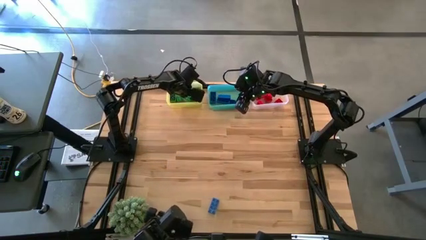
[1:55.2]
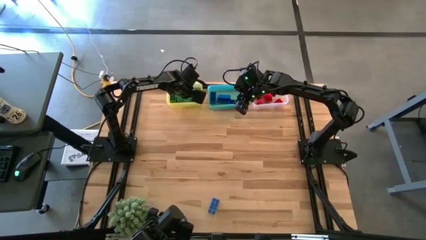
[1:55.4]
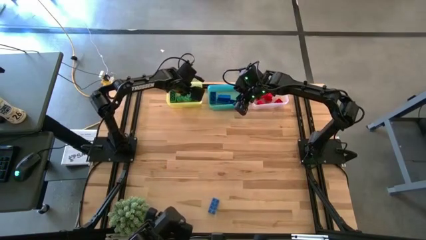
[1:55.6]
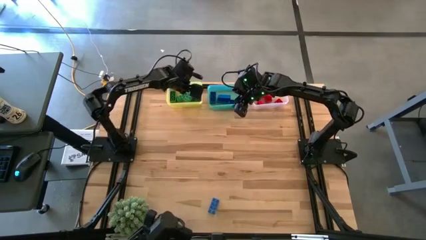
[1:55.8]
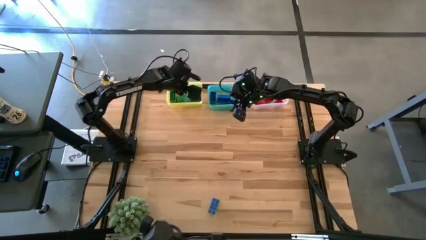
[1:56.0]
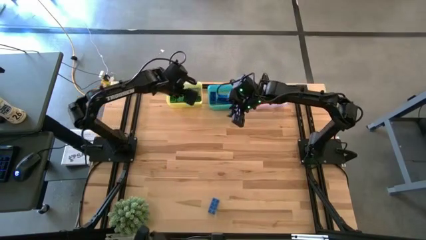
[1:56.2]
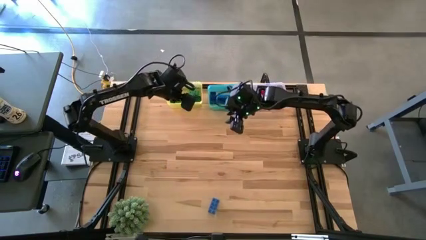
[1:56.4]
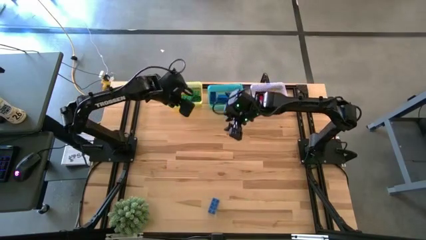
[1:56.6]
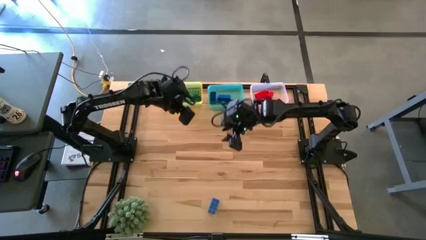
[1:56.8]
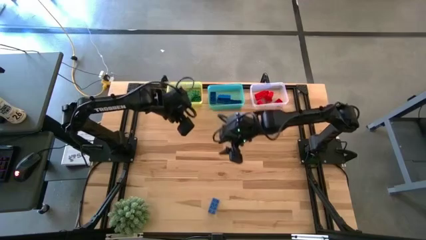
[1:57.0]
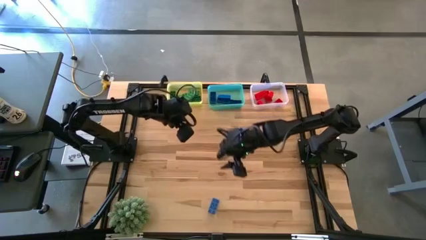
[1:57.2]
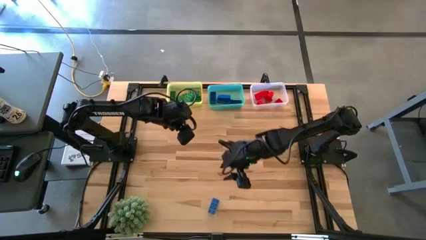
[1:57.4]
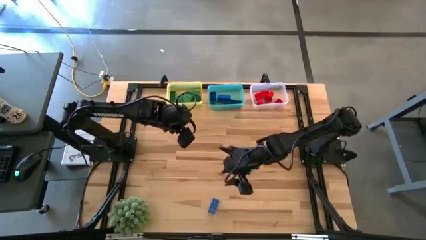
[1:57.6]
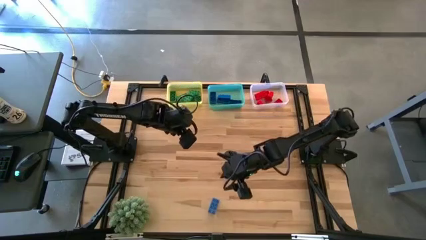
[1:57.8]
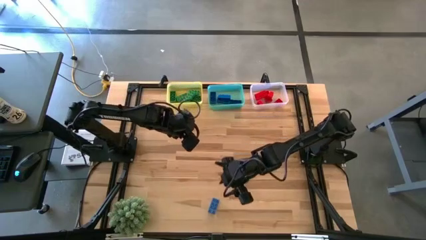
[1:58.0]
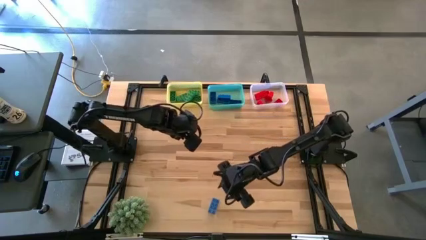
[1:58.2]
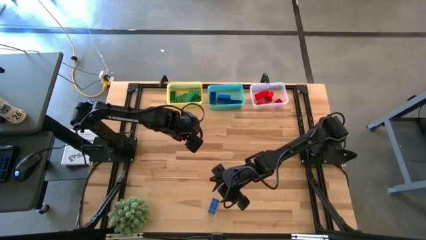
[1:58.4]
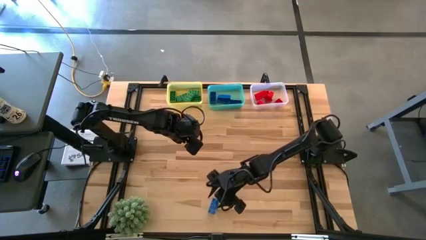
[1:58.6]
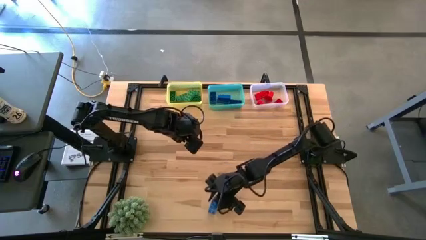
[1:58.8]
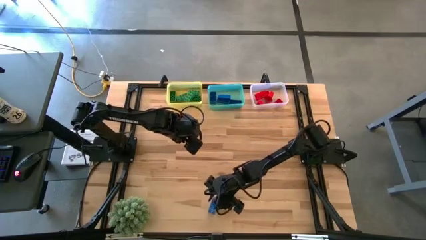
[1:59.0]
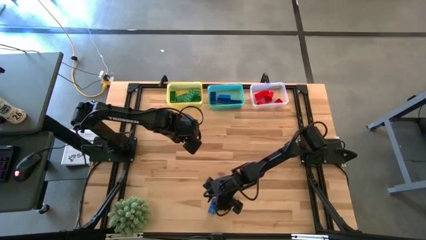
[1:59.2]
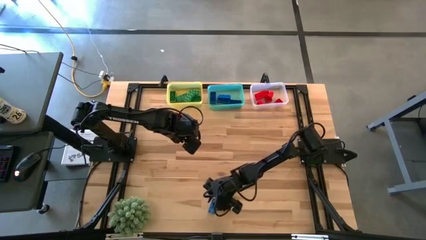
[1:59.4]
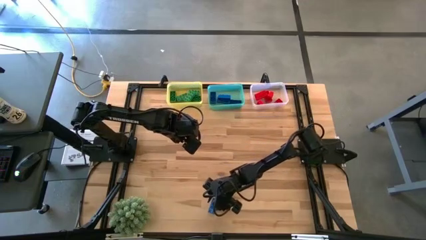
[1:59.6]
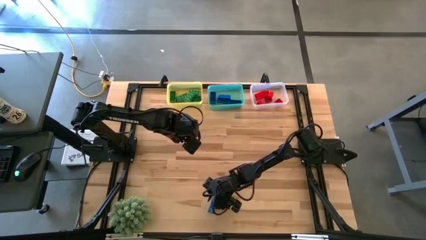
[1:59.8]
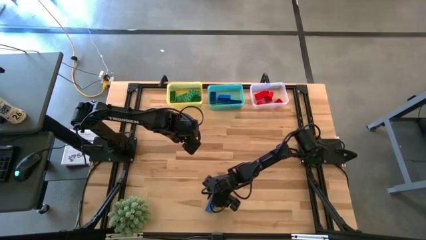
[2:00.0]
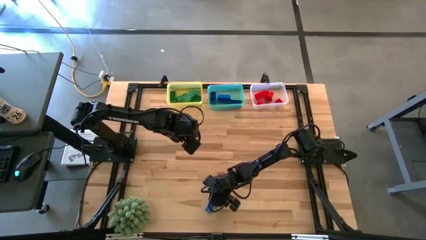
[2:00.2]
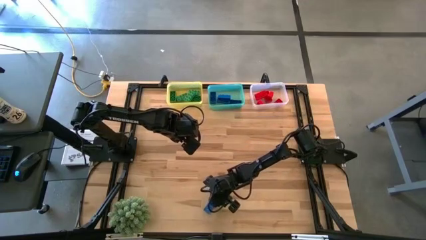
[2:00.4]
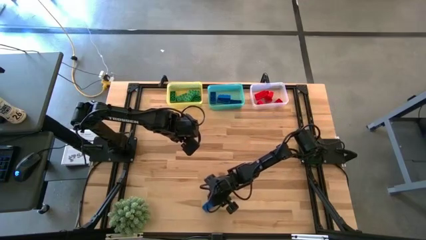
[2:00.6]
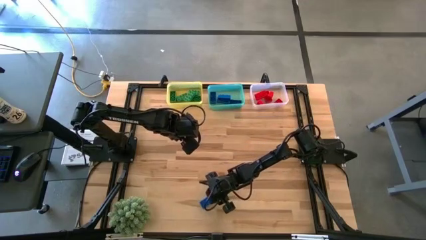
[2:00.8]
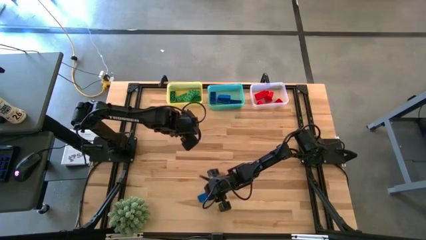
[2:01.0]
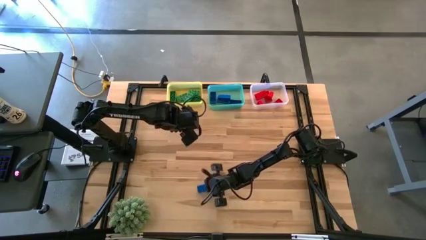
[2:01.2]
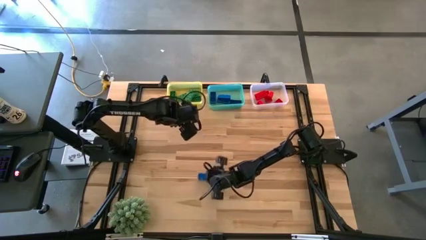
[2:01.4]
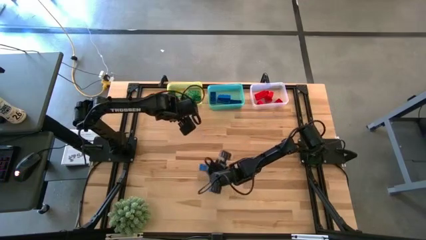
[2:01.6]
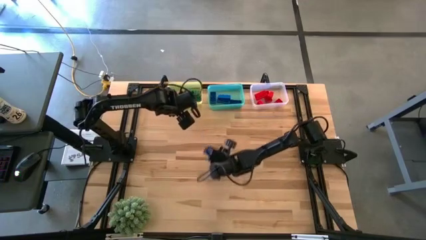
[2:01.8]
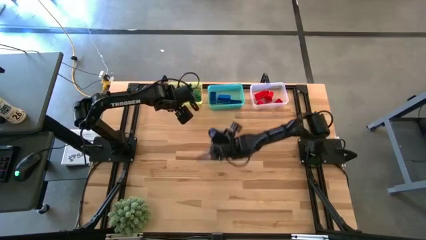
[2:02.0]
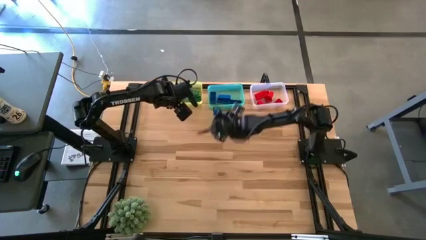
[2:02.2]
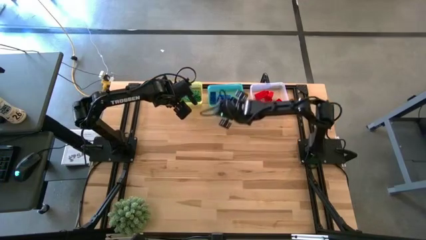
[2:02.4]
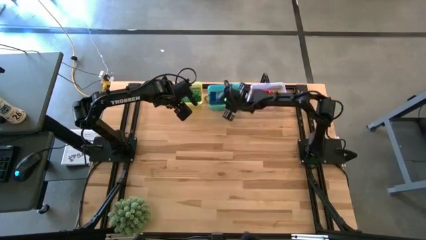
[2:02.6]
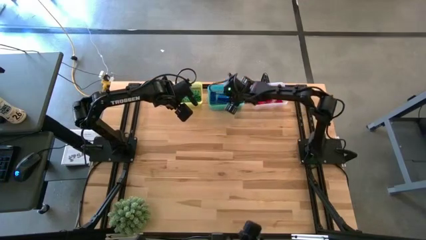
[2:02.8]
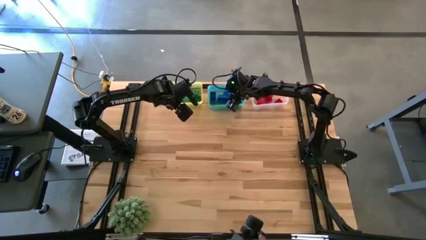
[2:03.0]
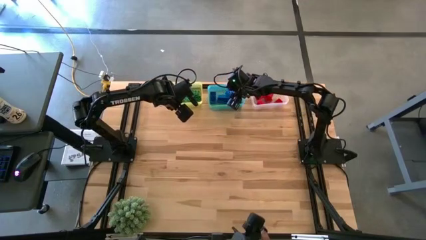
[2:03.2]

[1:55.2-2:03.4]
Task: Sort & place blocks by color
Put the blue game piece into the blue bin

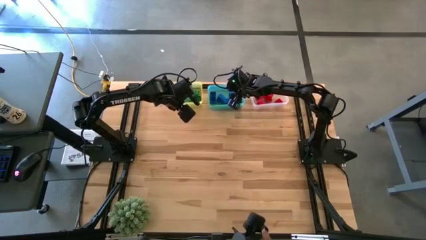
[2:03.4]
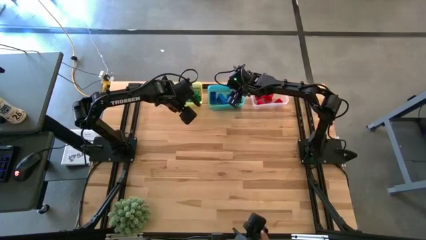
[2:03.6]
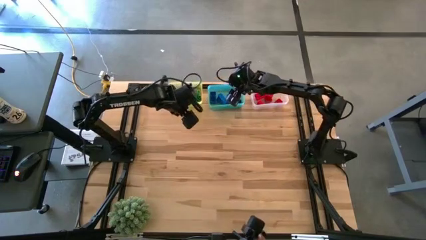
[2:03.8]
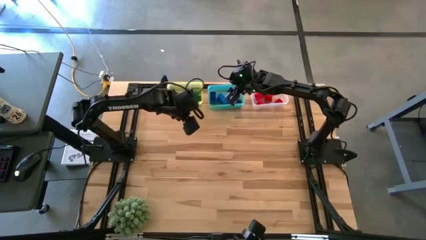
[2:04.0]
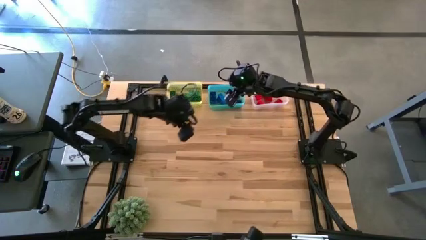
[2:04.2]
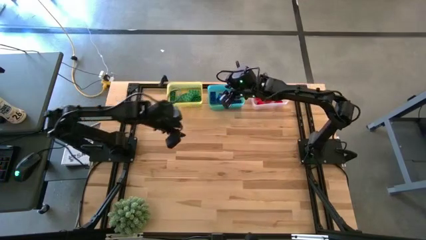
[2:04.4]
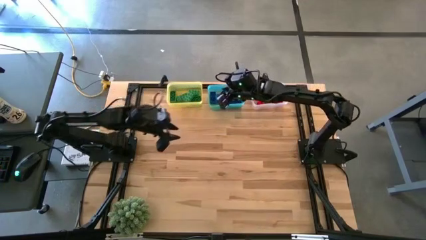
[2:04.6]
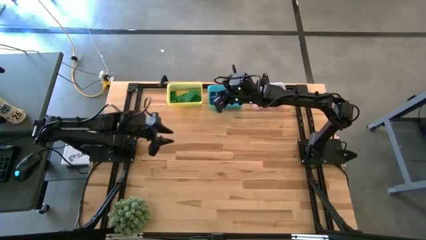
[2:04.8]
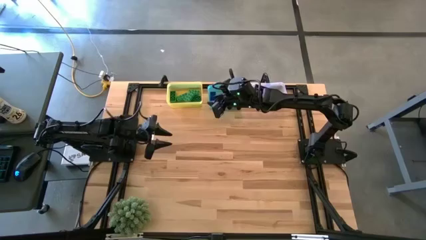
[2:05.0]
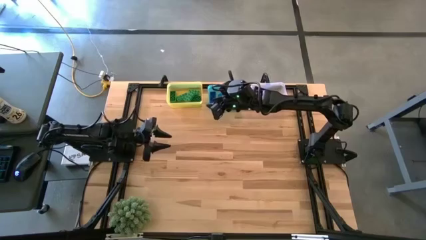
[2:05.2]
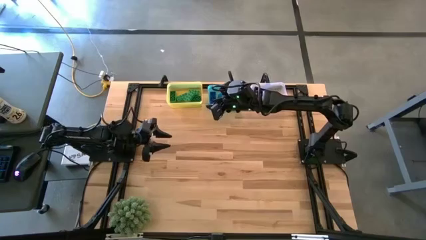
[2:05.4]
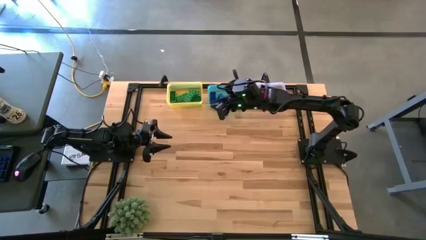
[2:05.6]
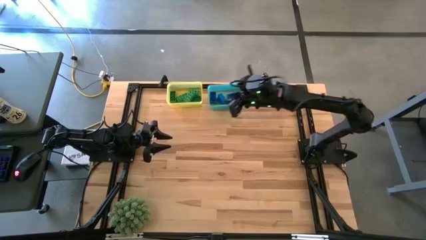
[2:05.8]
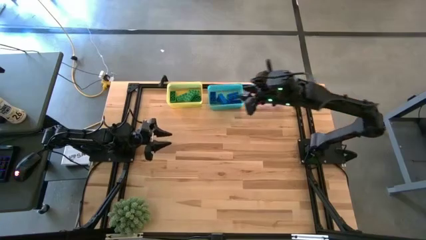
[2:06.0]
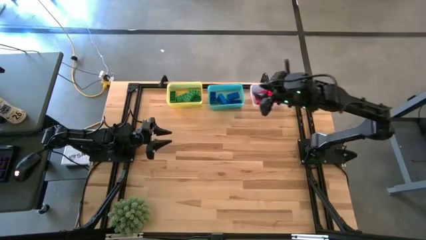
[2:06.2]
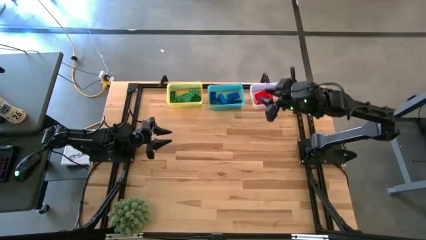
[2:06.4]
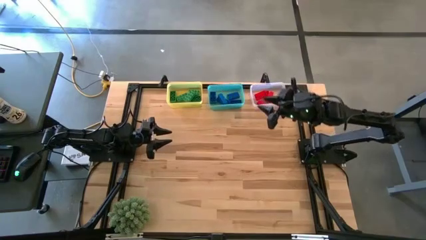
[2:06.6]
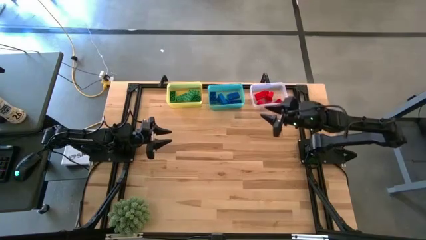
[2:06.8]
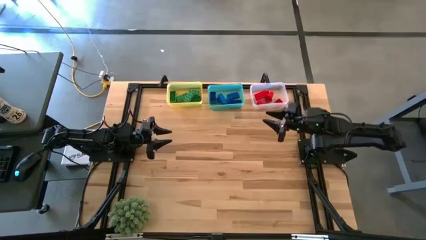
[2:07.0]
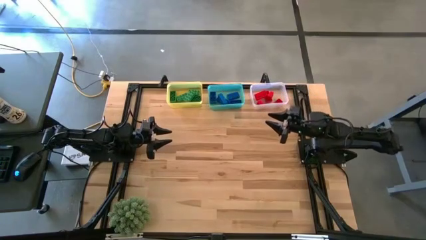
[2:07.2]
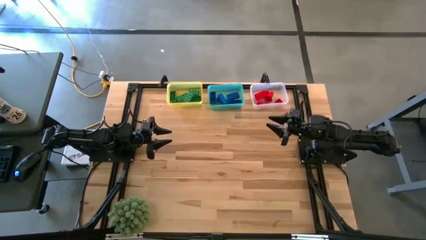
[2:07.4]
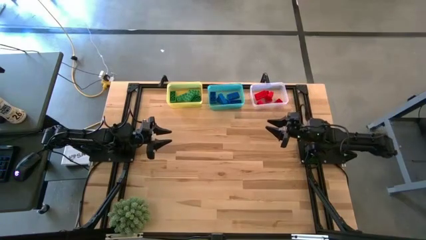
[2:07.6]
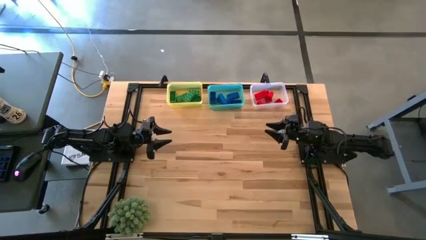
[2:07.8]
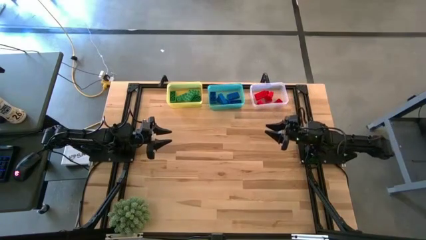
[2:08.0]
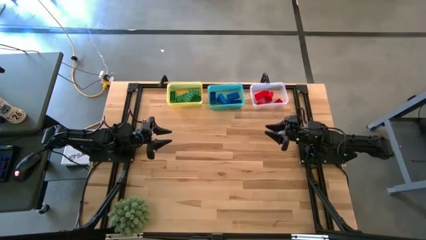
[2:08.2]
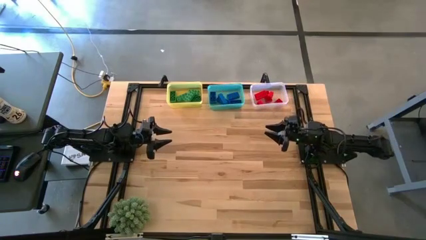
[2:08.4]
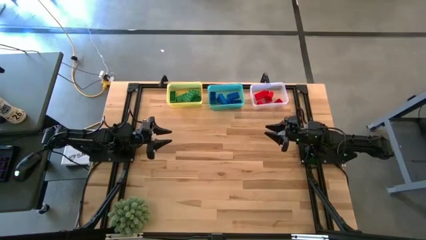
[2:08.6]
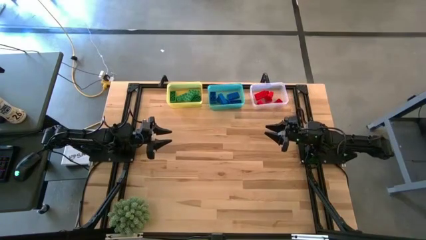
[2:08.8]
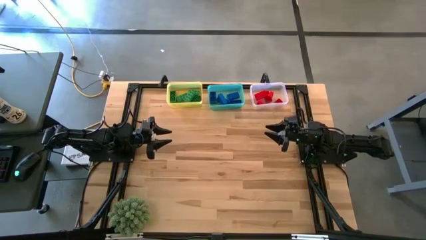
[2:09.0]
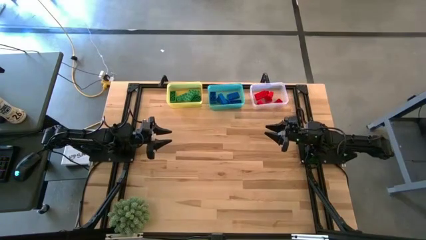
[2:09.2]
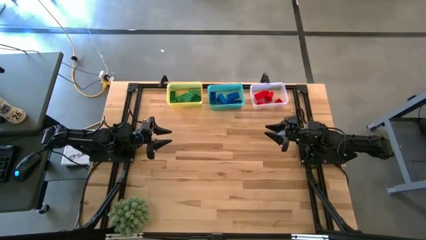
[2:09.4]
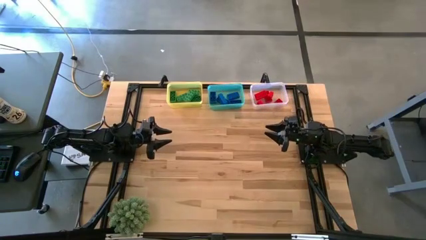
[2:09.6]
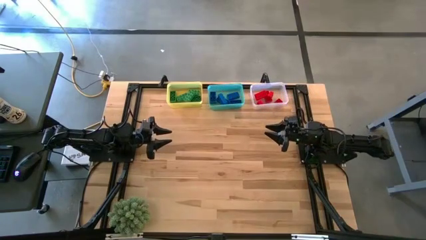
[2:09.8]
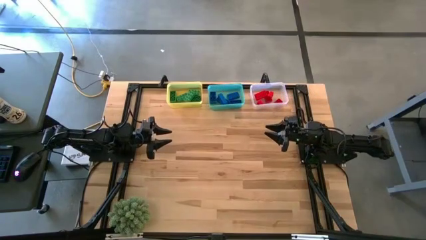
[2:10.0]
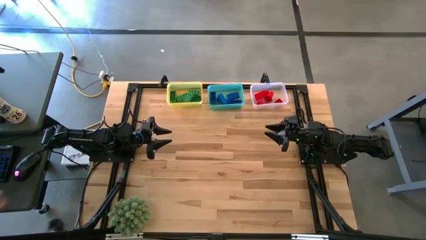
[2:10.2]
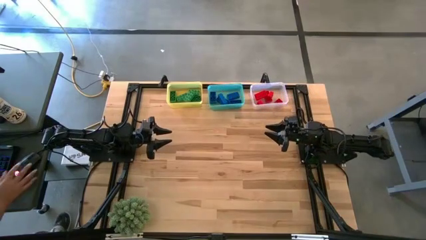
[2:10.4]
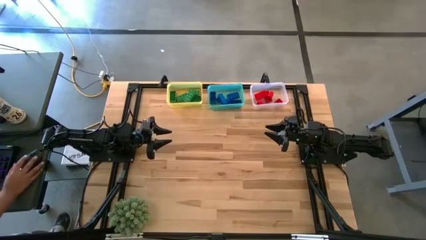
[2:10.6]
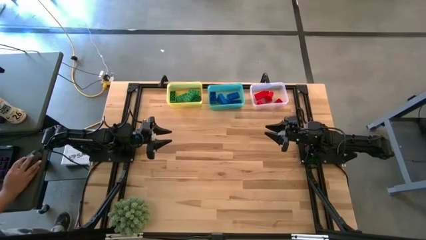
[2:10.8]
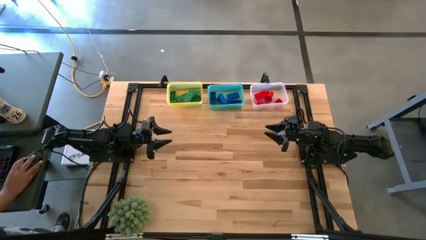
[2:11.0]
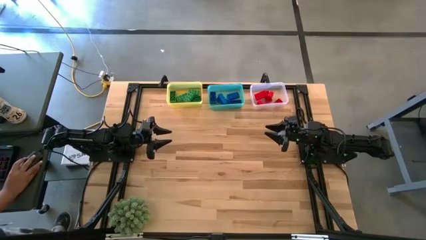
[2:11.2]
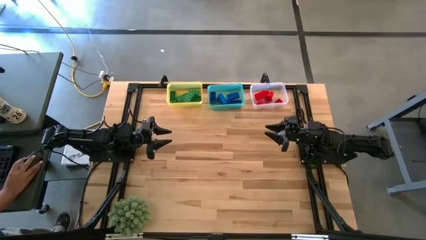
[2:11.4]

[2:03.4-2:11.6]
Return to Home Position
